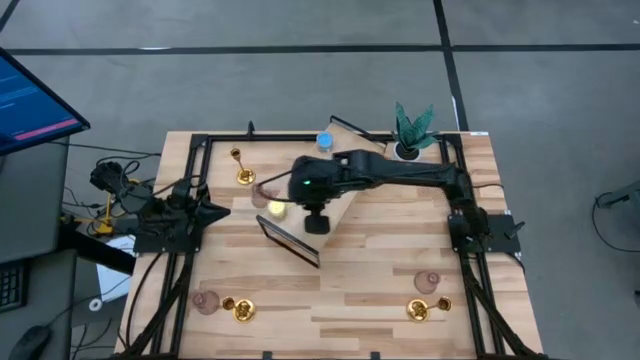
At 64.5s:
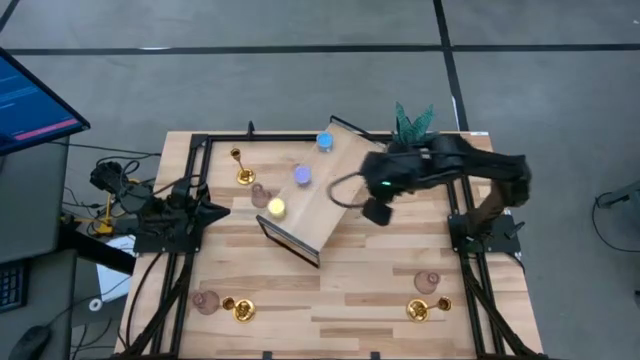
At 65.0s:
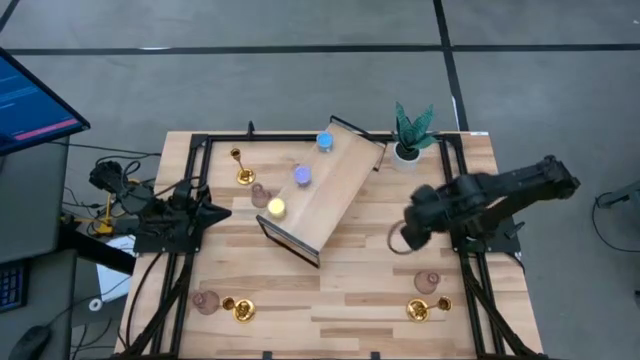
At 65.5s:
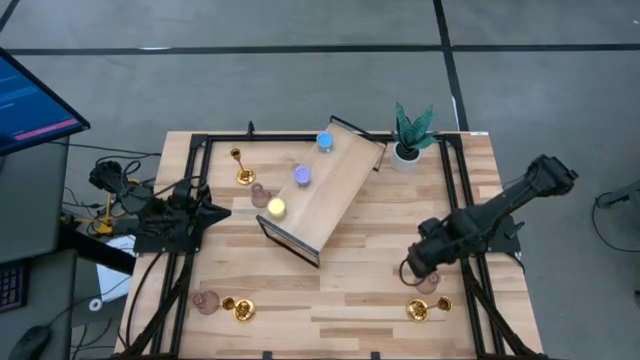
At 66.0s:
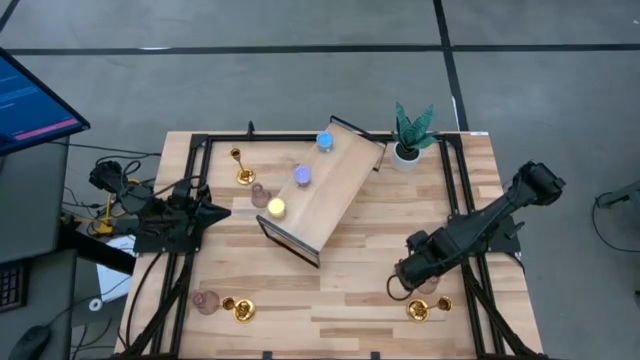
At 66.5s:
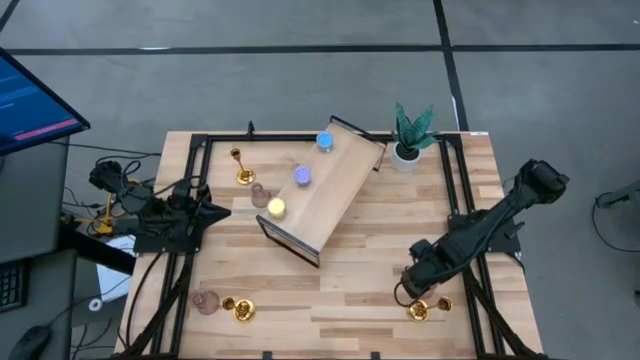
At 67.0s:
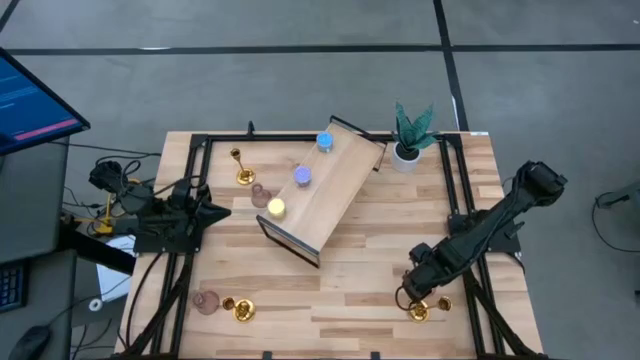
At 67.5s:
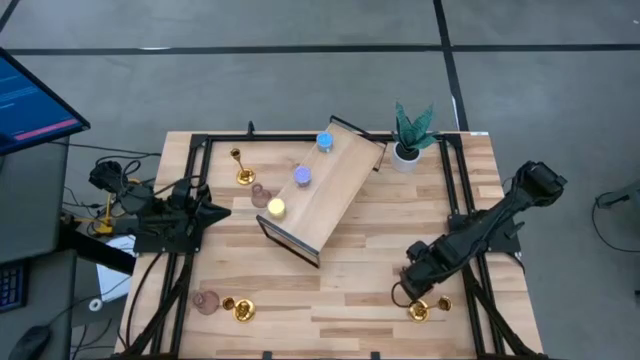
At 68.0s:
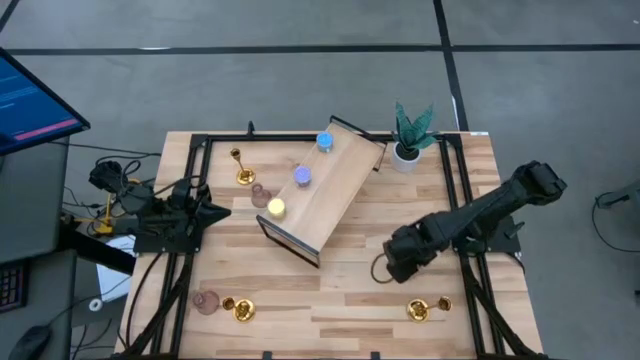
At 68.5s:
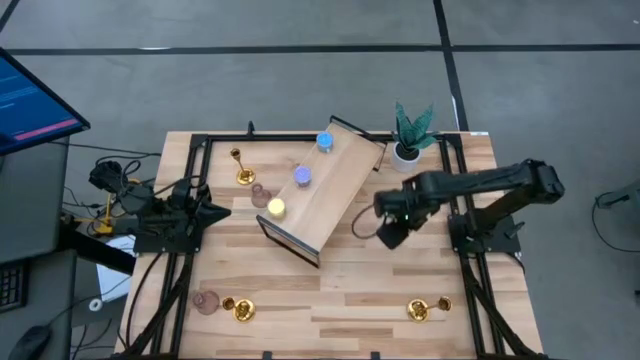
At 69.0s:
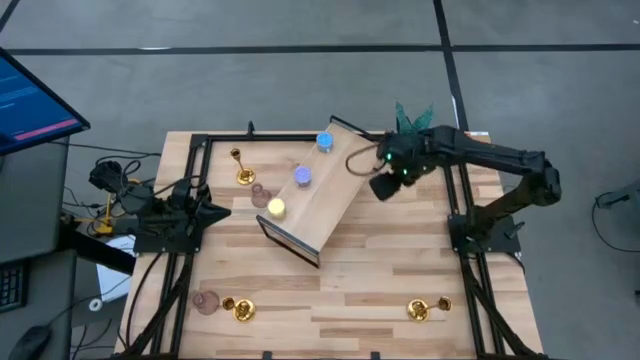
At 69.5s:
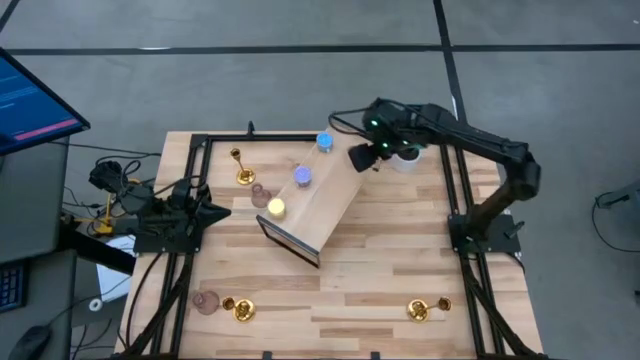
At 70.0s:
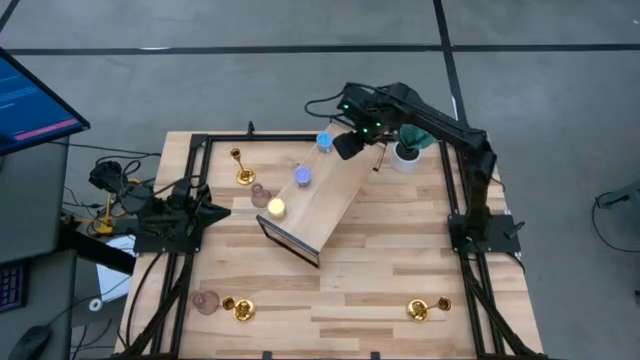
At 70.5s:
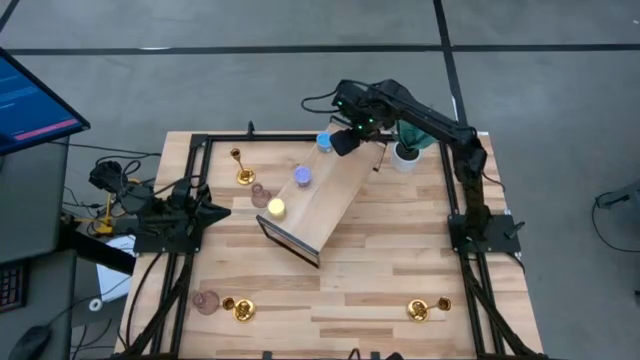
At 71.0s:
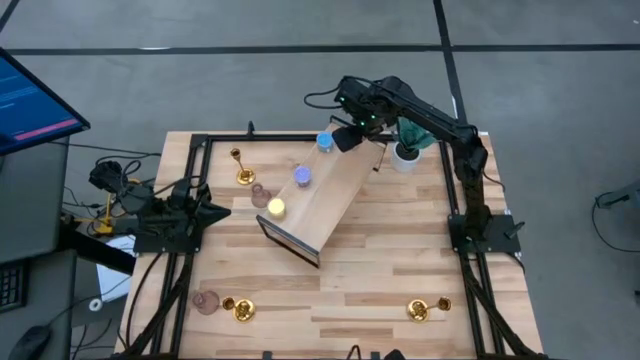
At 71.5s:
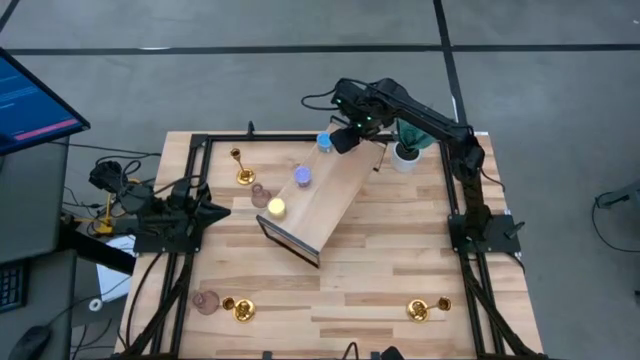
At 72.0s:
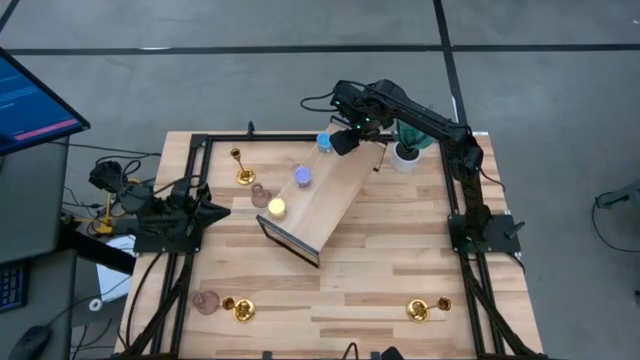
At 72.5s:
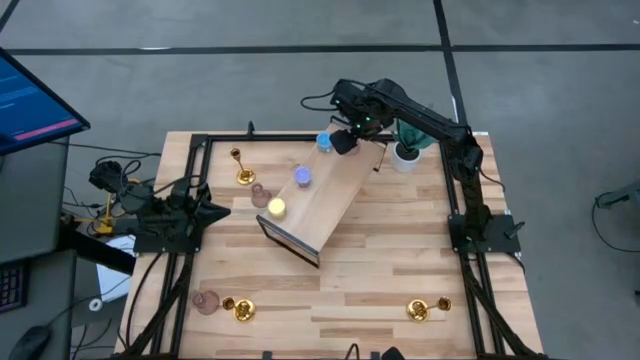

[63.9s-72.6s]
Task: Pick & Place candle stick holders
Put the right glass candle holder on the shelf

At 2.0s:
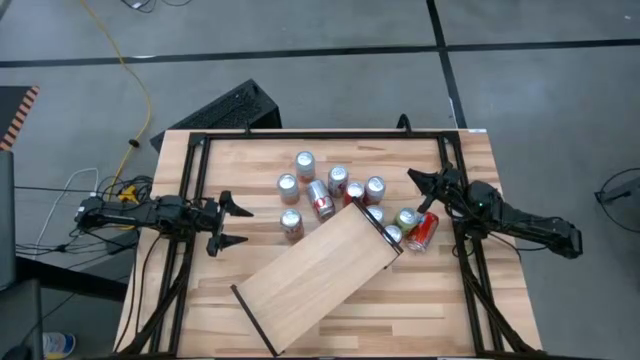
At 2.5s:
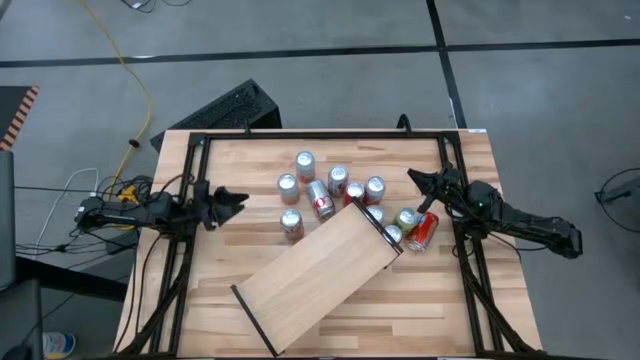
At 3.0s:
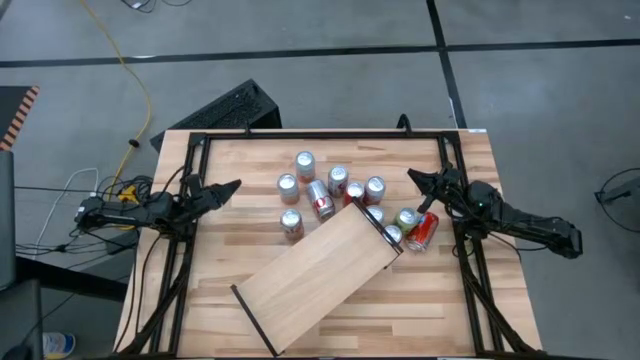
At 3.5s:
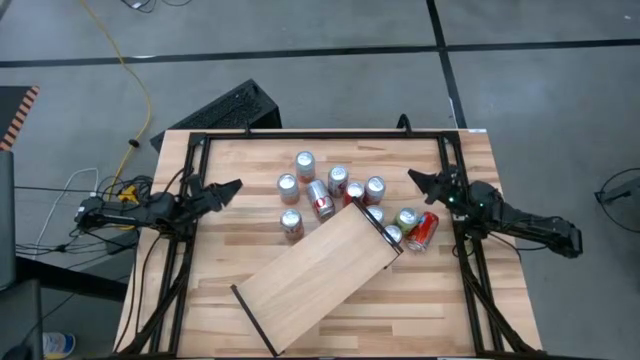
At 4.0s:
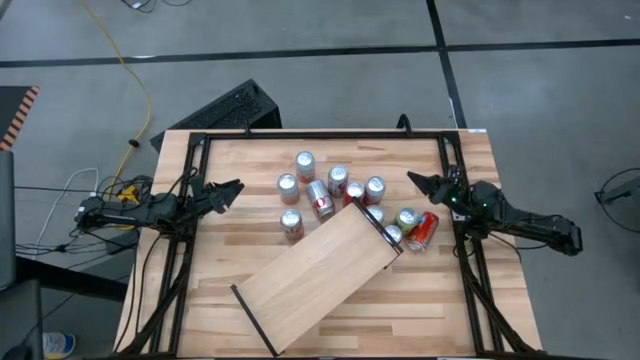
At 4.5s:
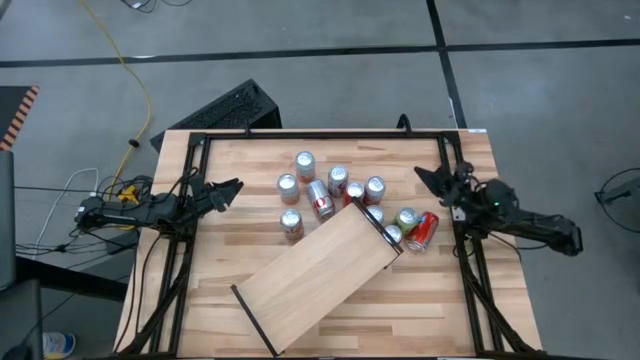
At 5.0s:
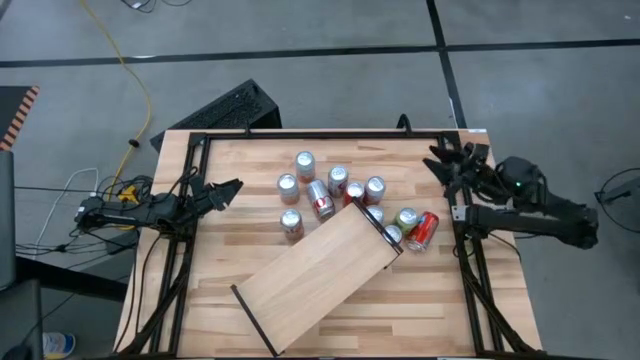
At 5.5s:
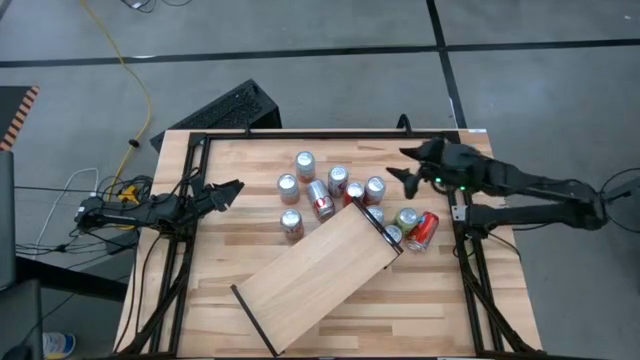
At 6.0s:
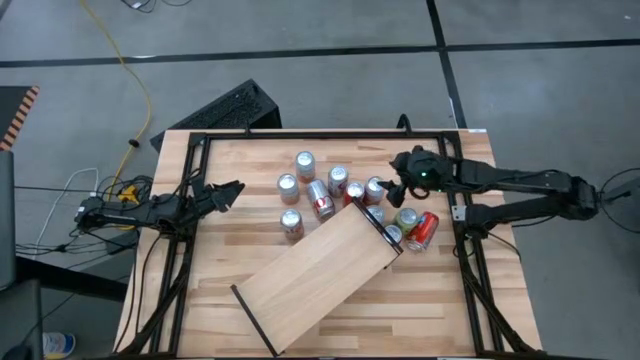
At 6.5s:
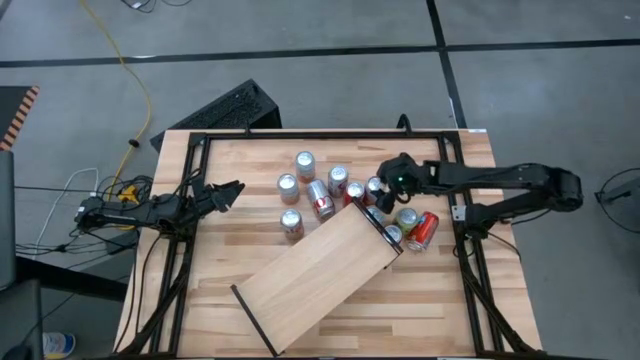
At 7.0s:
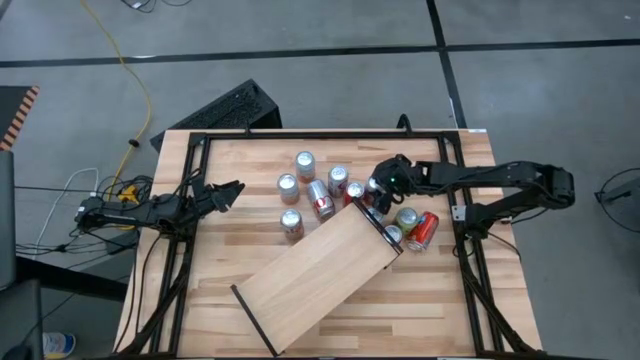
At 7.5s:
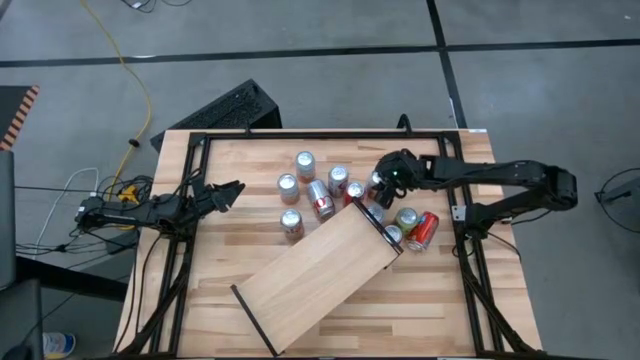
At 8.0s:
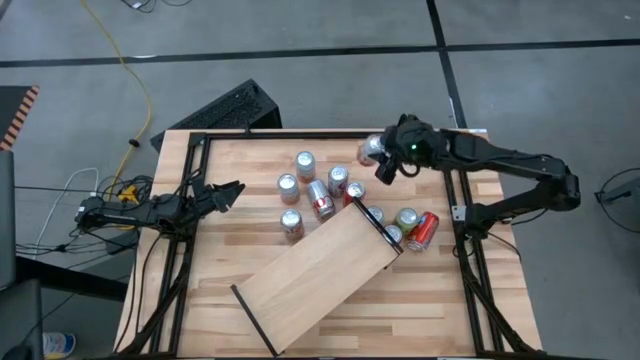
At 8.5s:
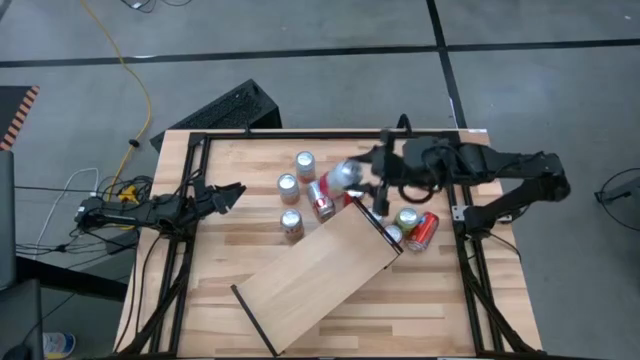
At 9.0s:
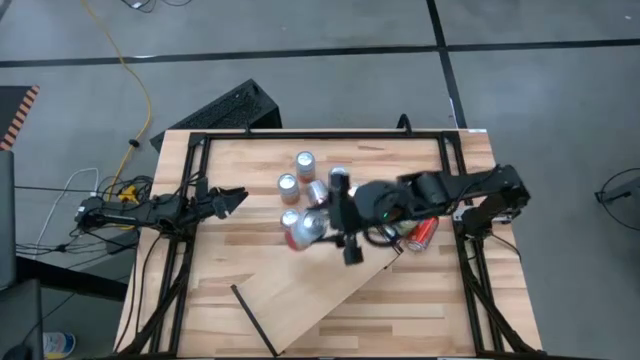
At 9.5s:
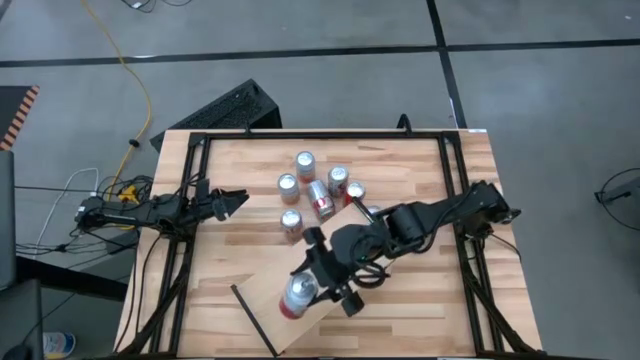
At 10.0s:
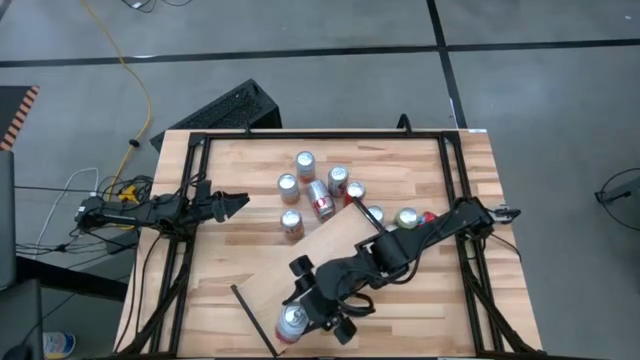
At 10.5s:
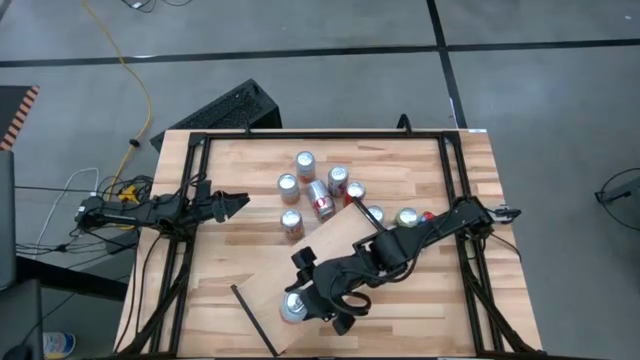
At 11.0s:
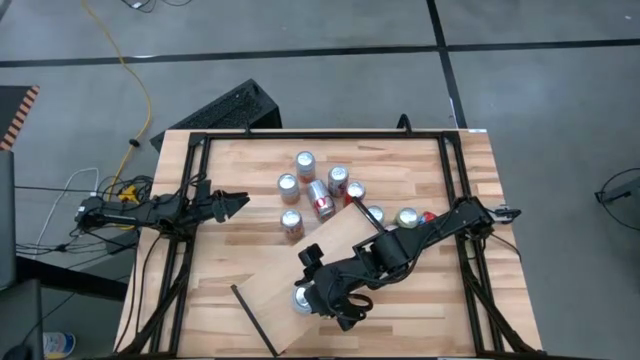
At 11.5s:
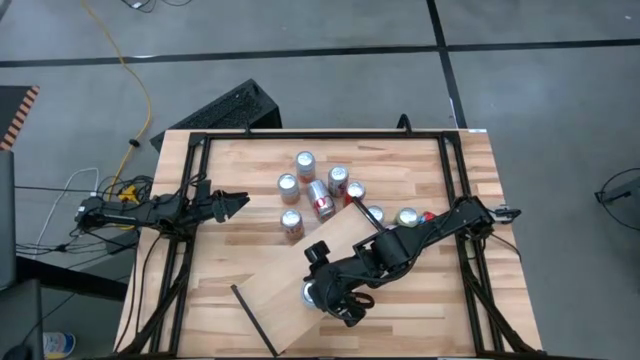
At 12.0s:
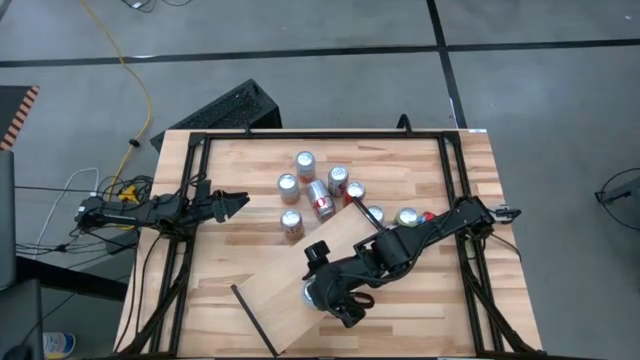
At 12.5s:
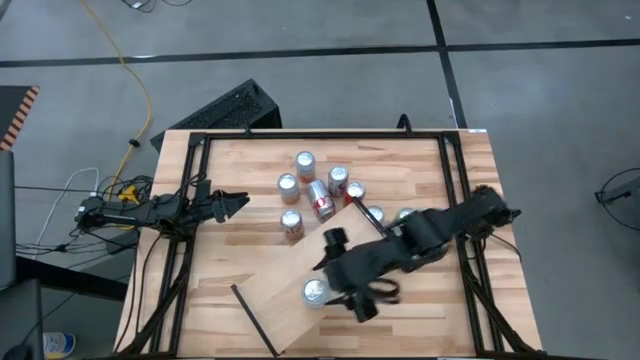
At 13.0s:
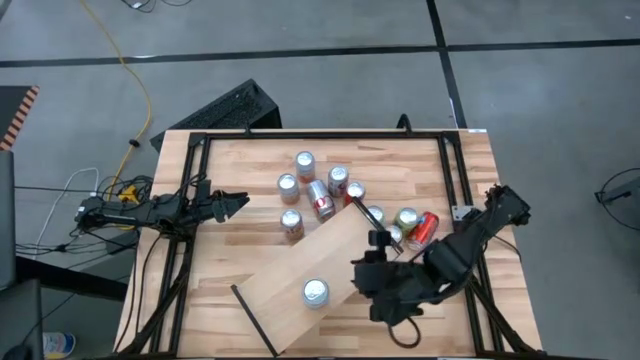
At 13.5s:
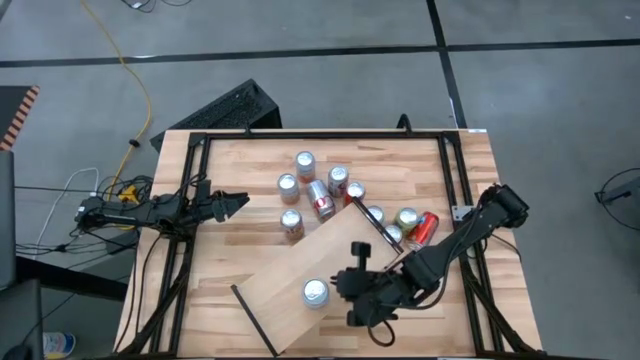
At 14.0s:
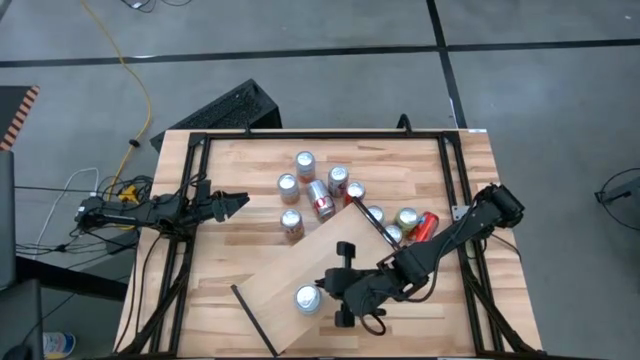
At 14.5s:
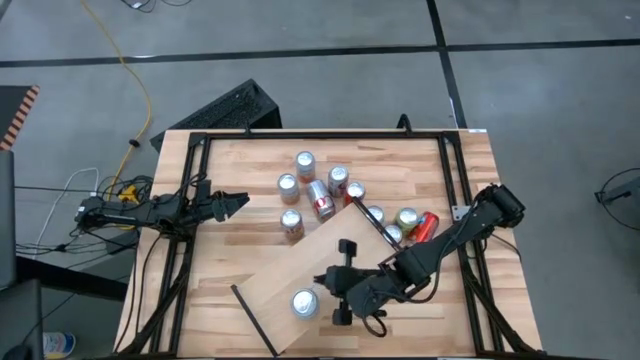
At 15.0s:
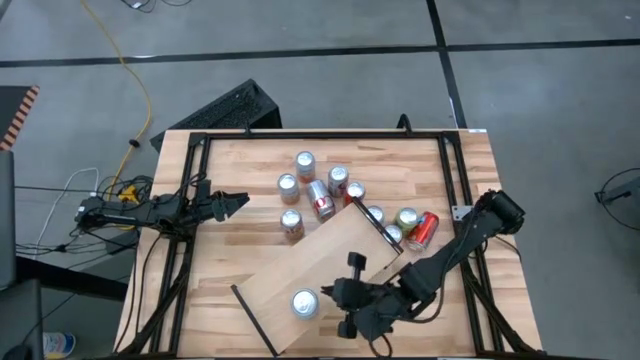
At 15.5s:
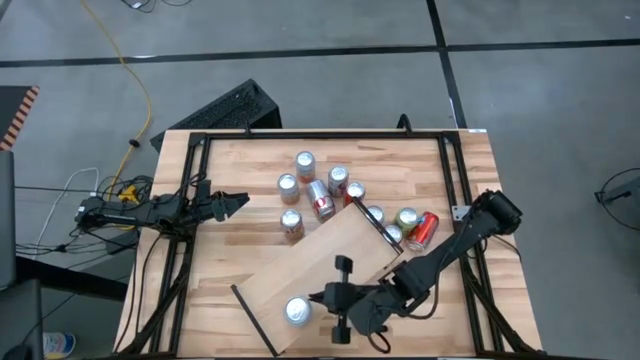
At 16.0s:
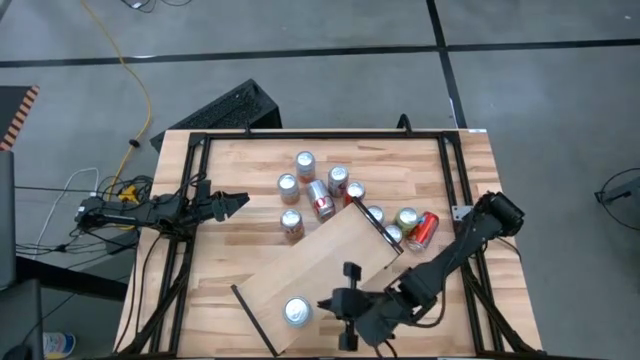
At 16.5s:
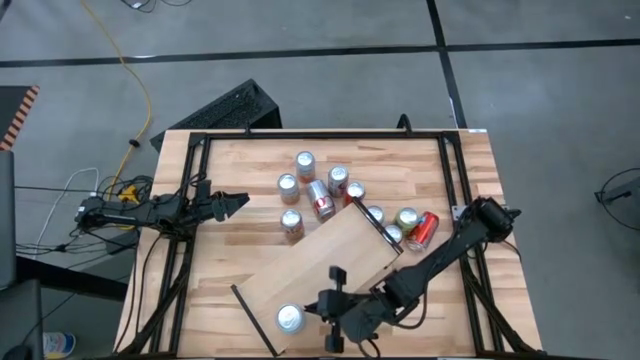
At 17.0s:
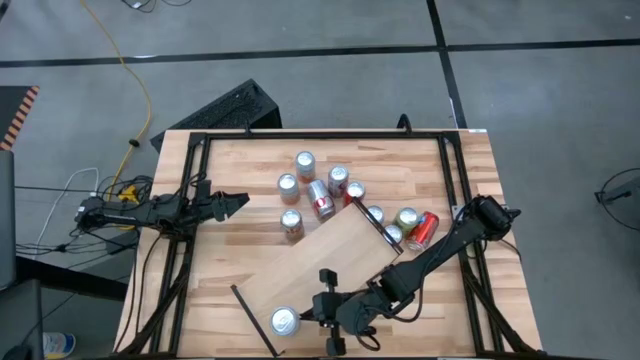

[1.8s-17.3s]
Task: Place canned beverage on shelf
Put the pink white soda can on the shelf
